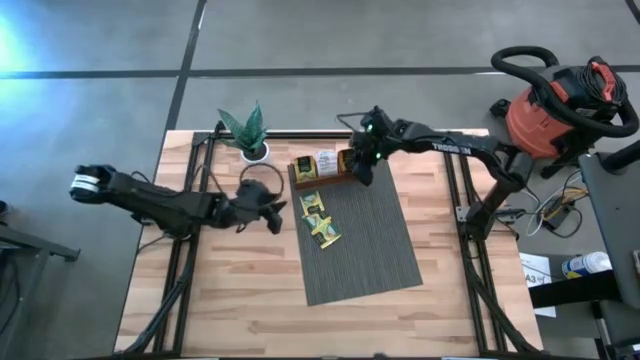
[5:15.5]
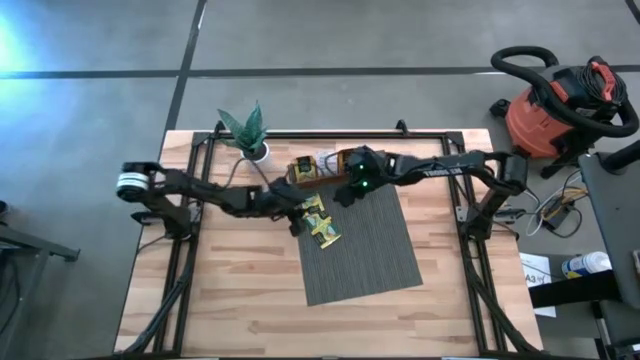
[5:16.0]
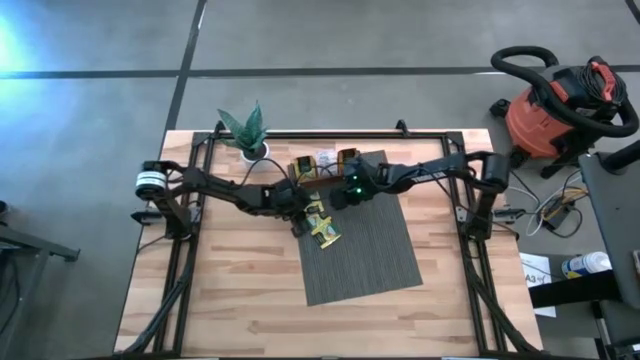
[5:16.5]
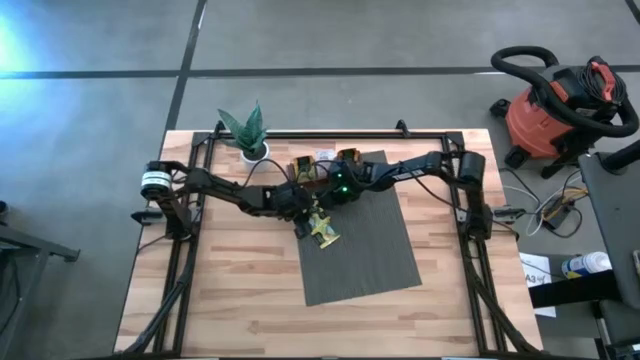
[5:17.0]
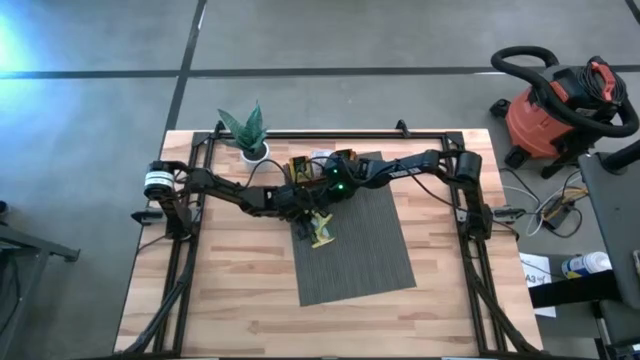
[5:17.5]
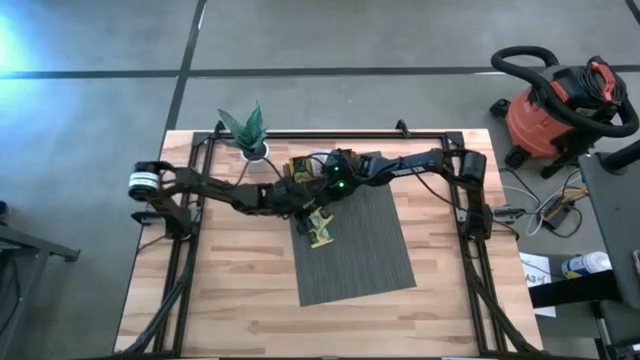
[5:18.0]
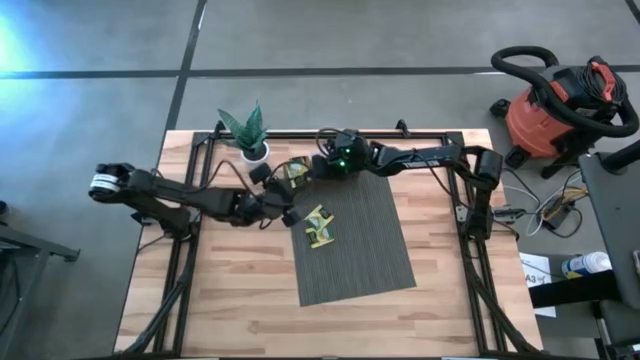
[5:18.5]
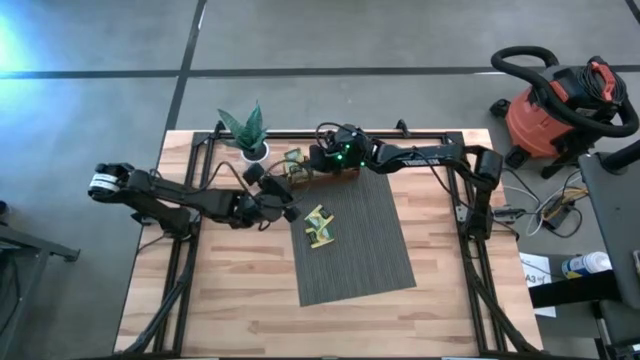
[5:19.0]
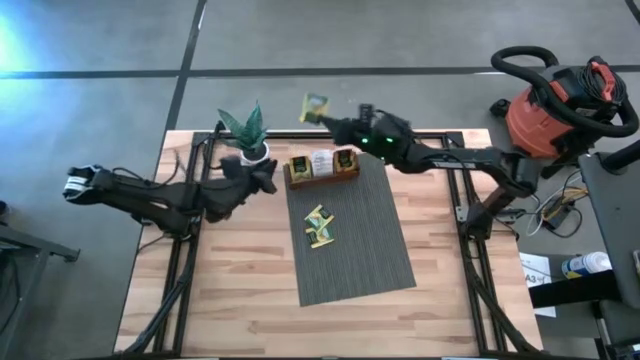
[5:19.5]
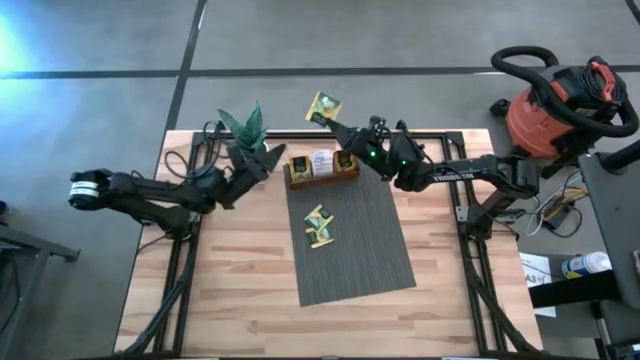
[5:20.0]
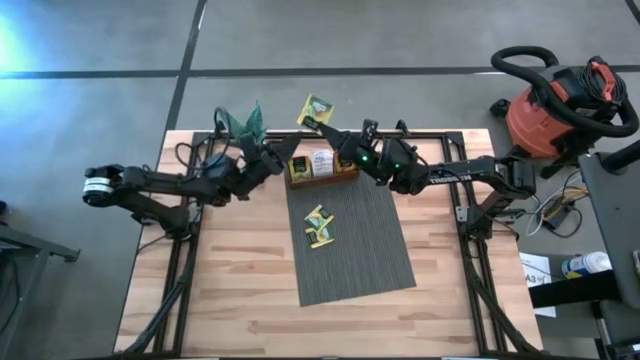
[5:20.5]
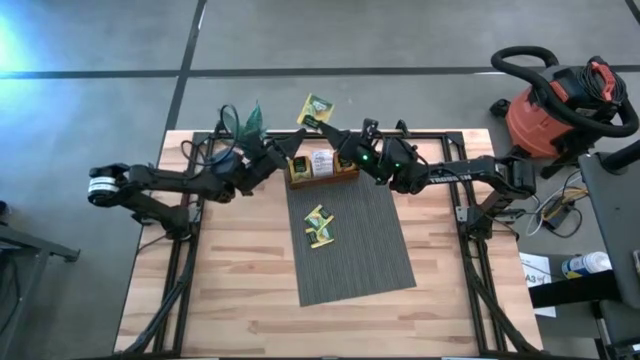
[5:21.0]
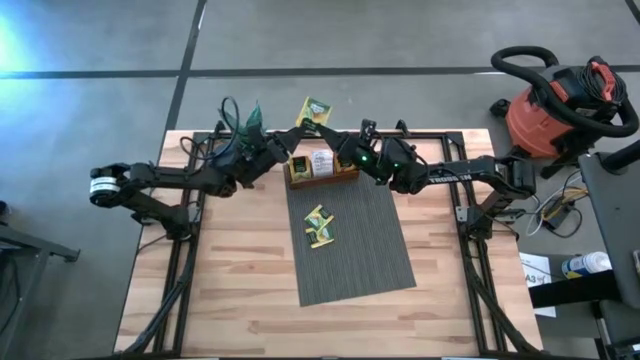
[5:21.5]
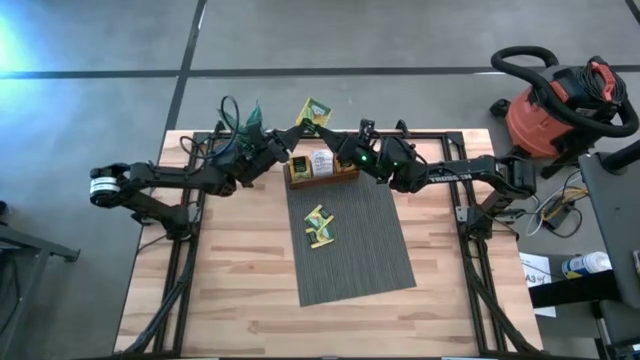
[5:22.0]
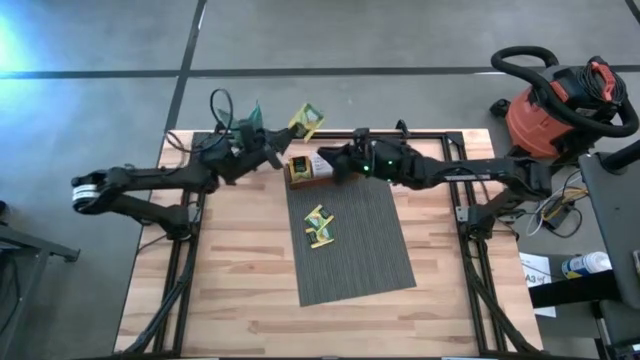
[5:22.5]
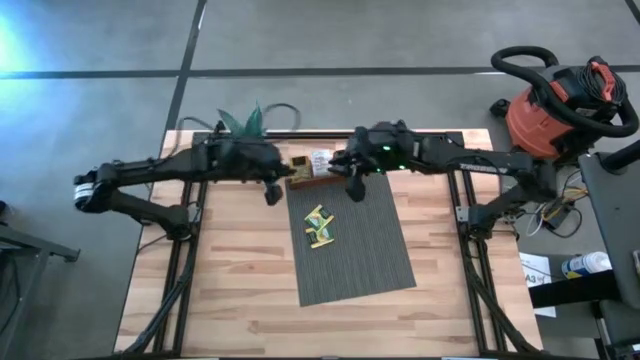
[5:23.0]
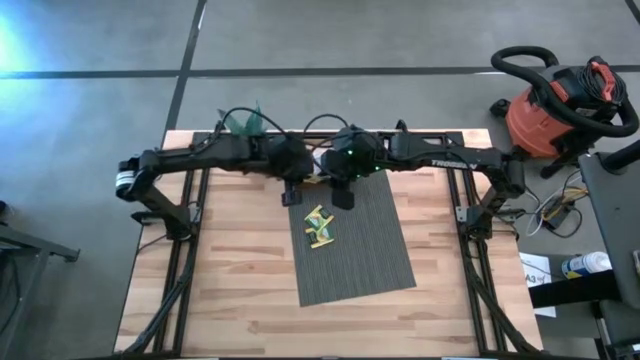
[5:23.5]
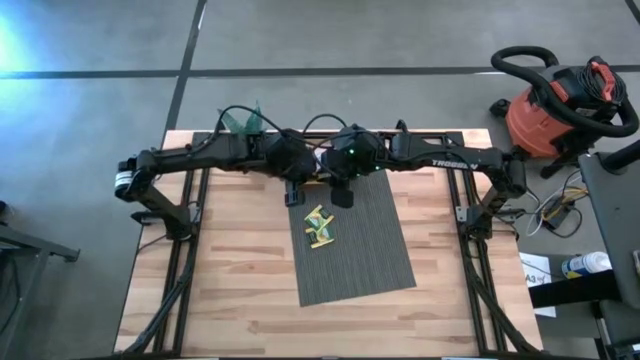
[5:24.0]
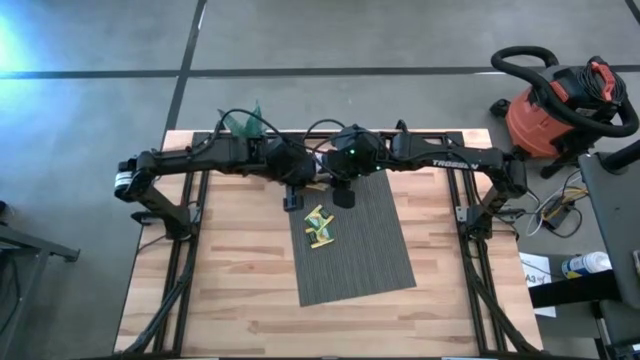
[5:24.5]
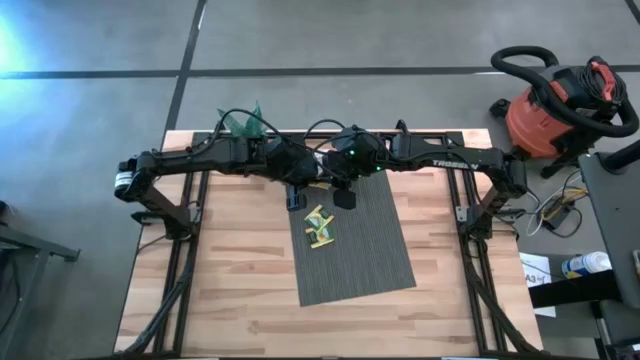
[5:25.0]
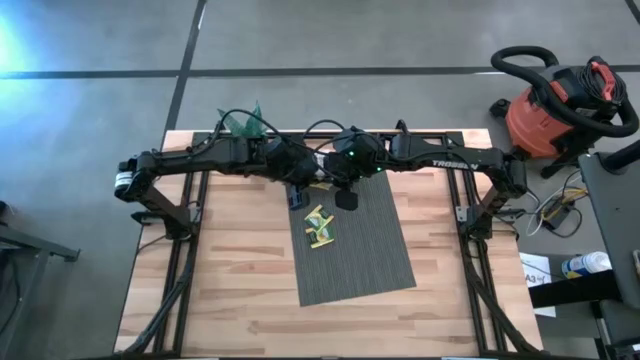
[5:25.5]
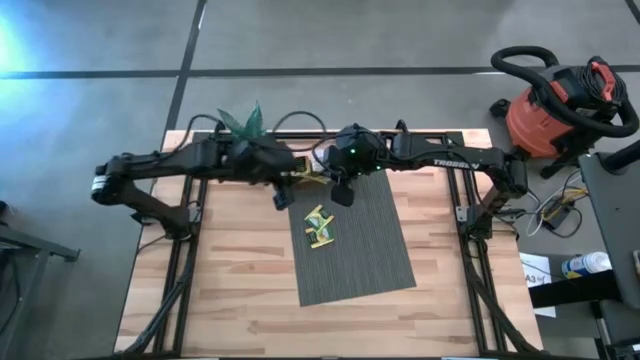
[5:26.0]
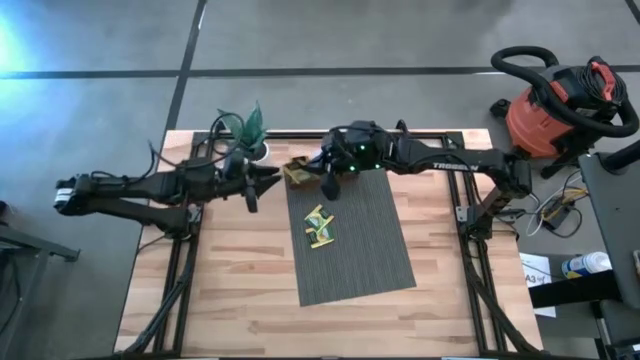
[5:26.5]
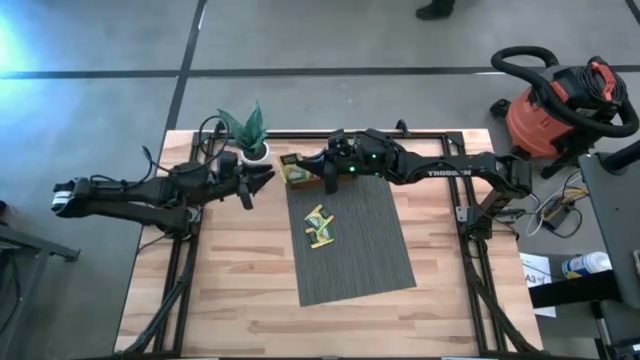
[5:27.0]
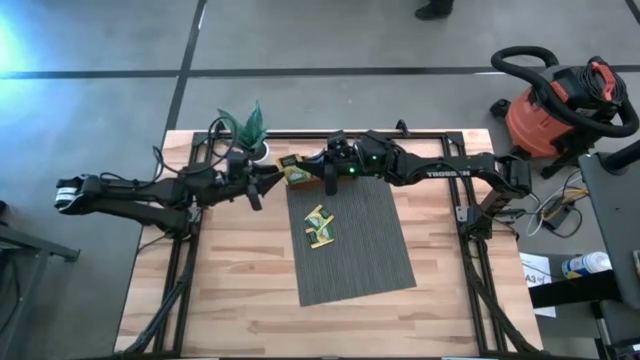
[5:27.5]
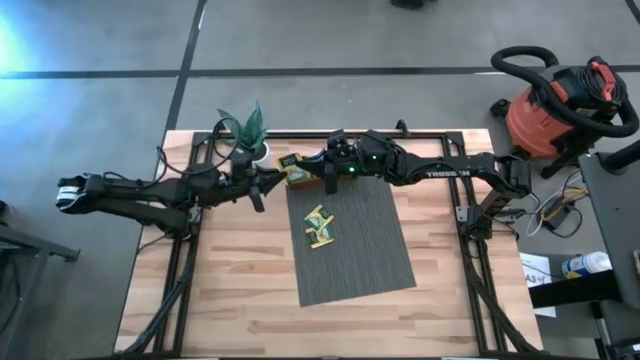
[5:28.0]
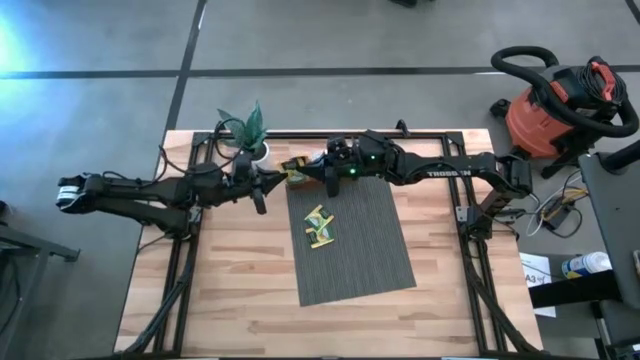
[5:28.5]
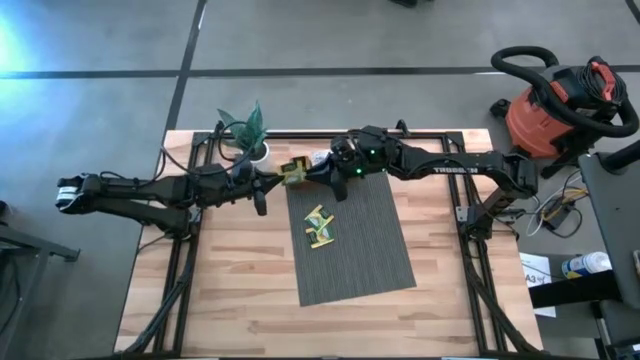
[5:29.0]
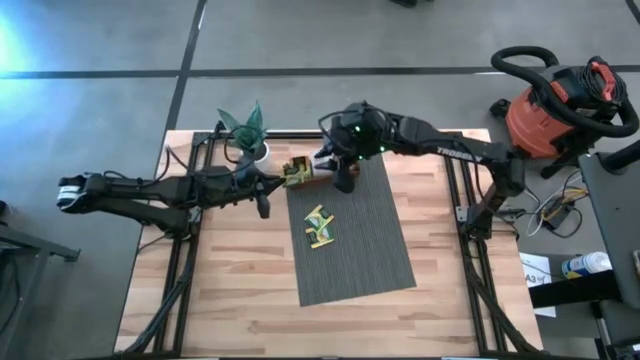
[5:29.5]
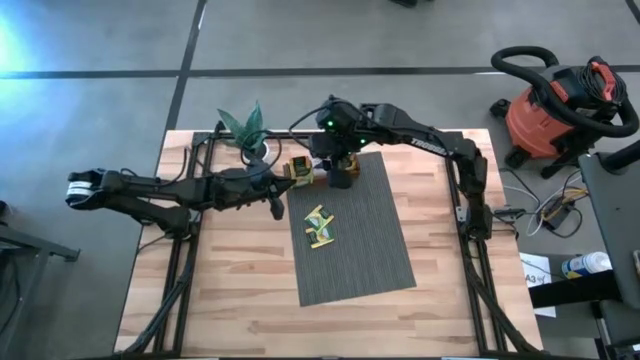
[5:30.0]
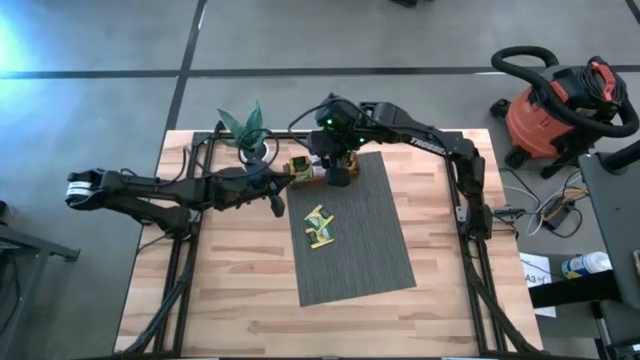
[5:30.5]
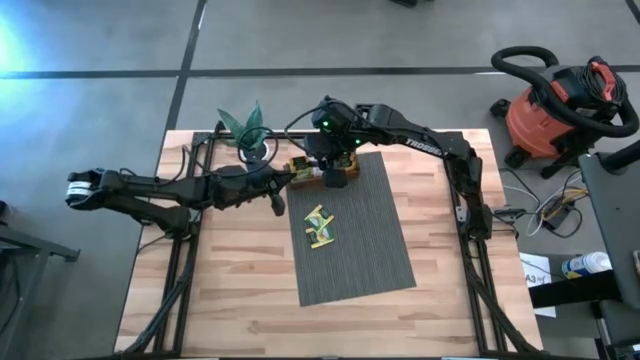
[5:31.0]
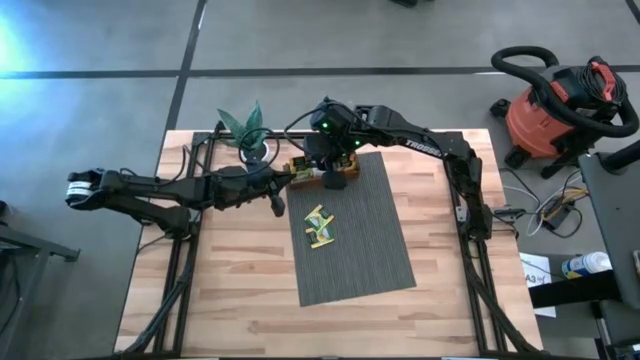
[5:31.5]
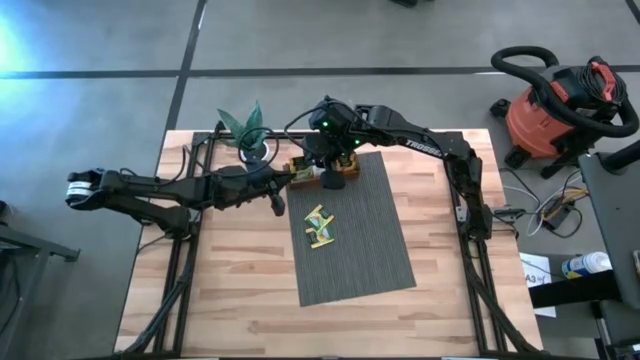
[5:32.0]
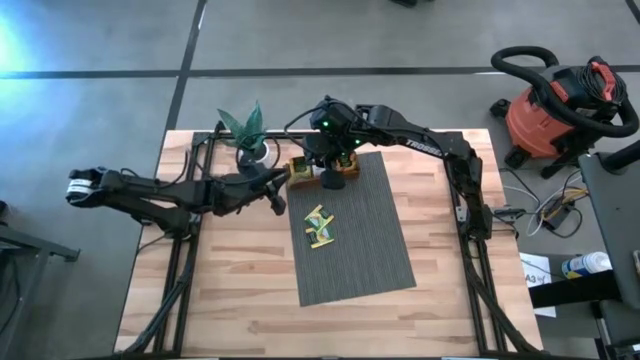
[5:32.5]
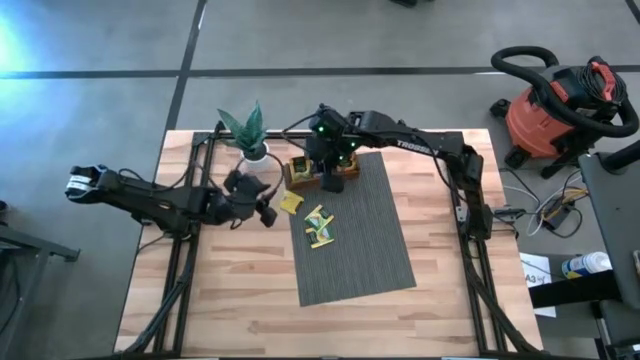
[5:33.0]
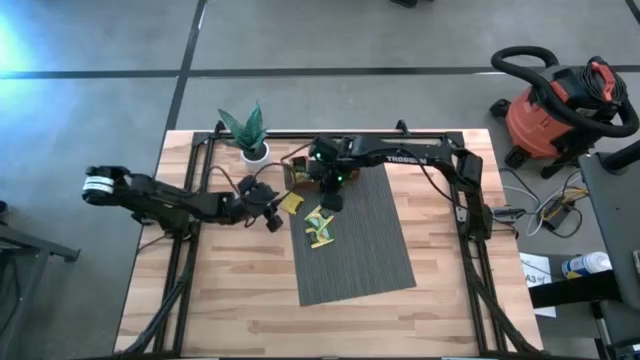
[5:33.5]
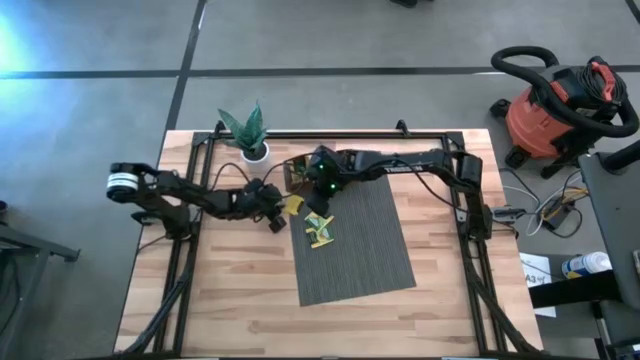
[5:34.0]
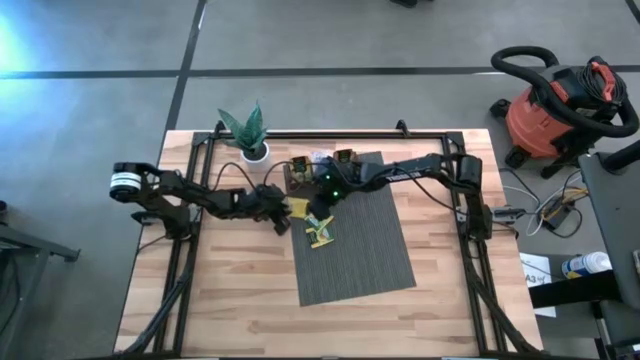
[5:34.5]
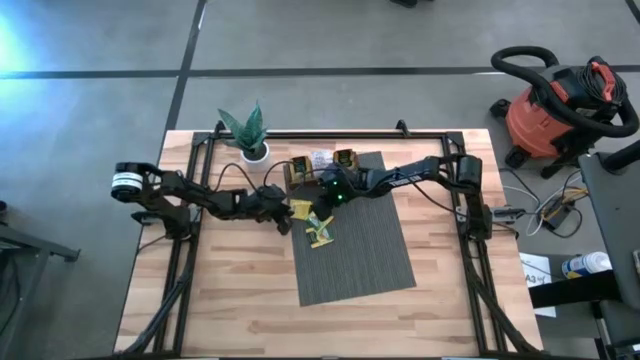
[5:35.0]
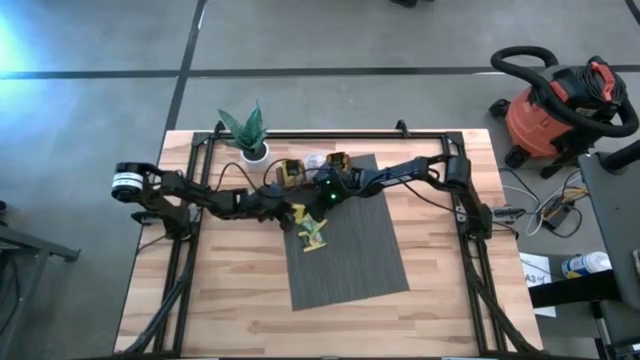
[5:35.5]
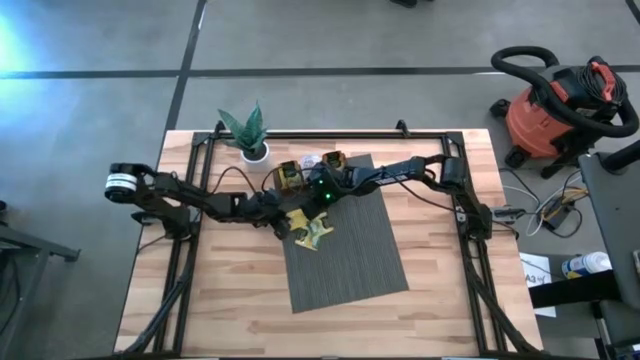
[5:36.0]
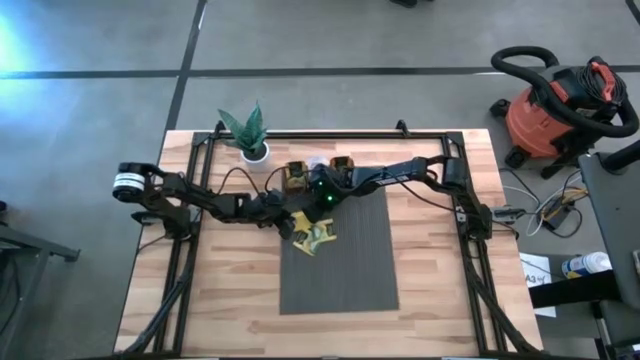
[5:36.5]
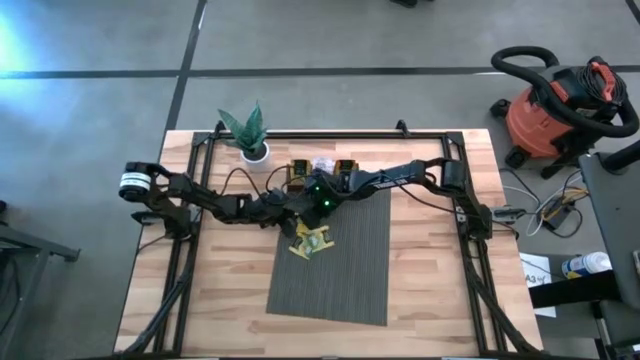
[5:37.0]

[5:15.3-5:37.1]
Task: Pick & Place Tea
Put the top yellow tea bag into the left compartment of the wooden organizer
